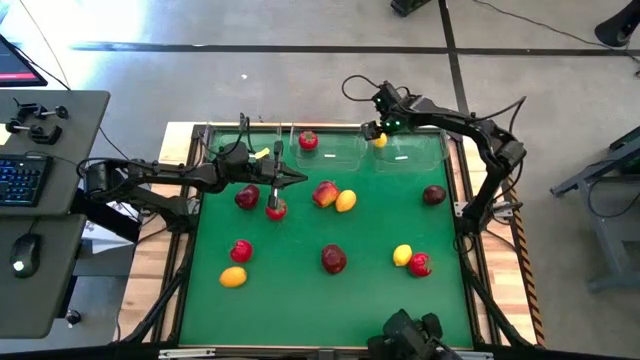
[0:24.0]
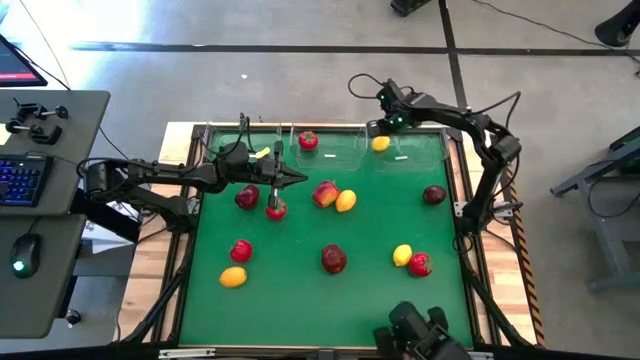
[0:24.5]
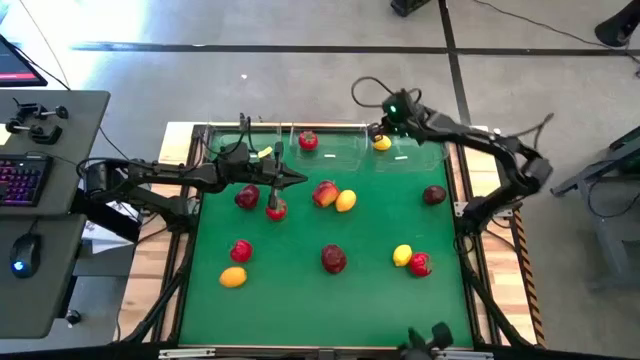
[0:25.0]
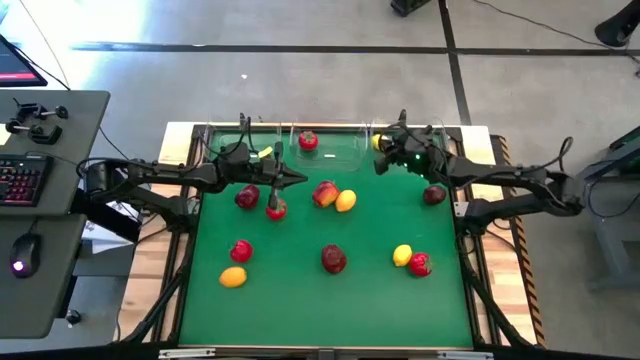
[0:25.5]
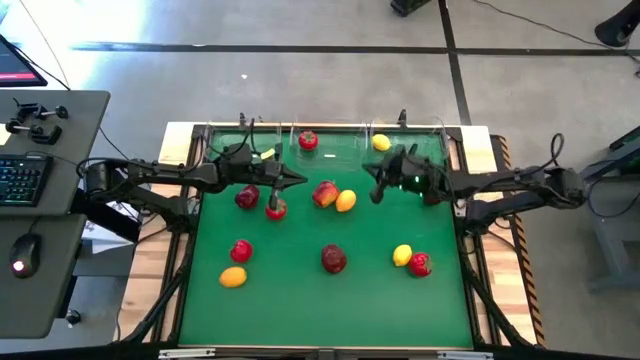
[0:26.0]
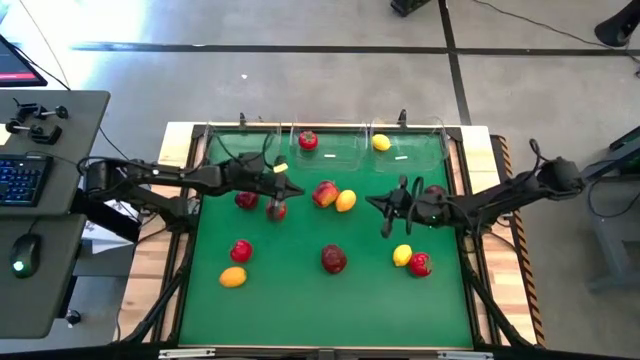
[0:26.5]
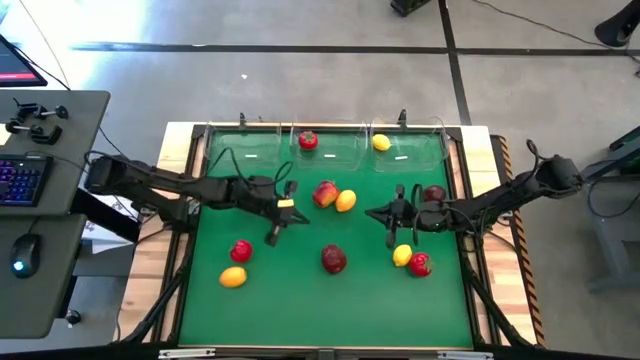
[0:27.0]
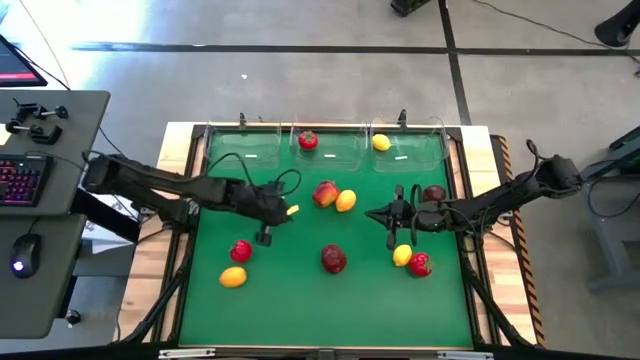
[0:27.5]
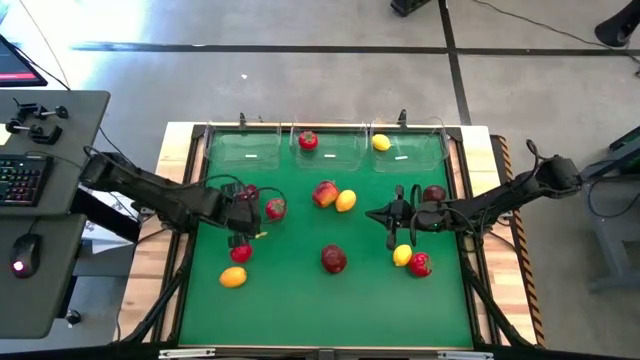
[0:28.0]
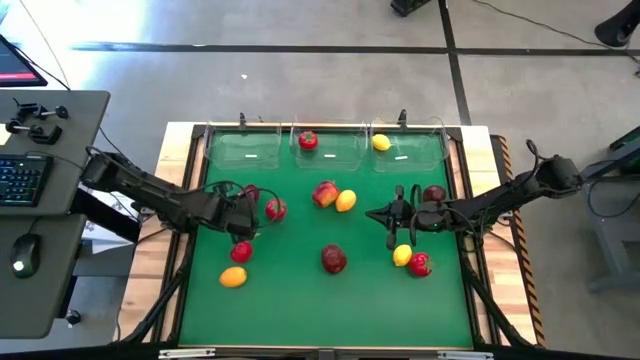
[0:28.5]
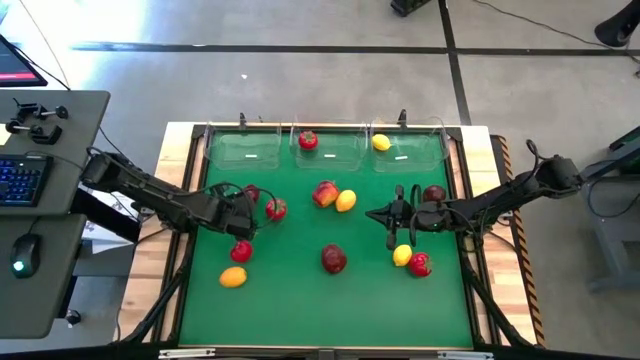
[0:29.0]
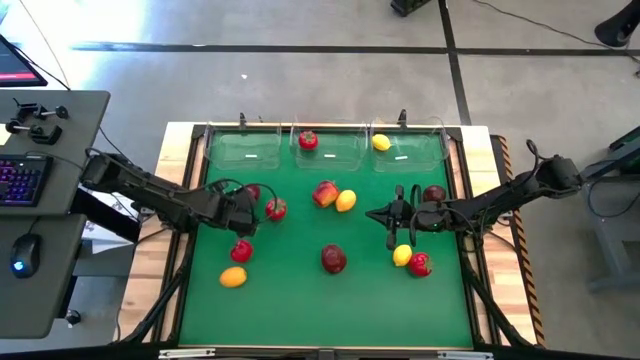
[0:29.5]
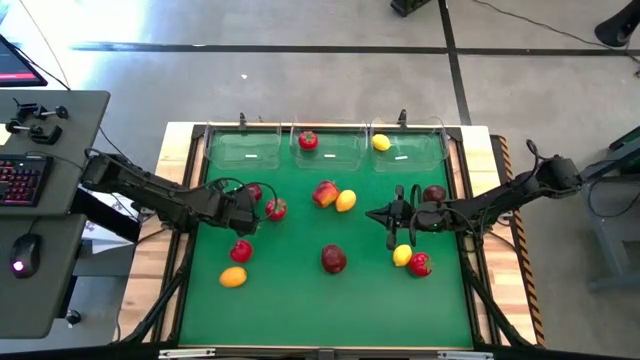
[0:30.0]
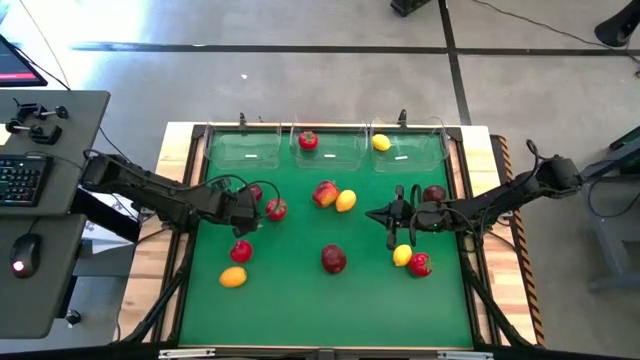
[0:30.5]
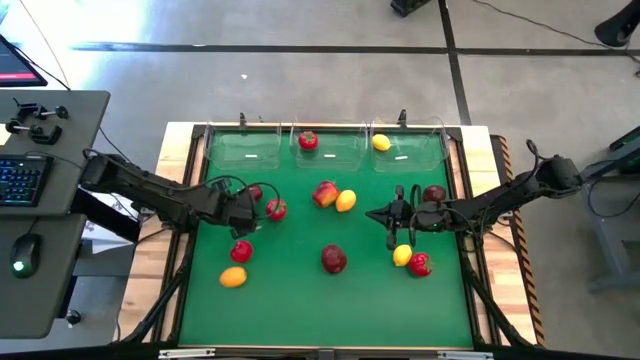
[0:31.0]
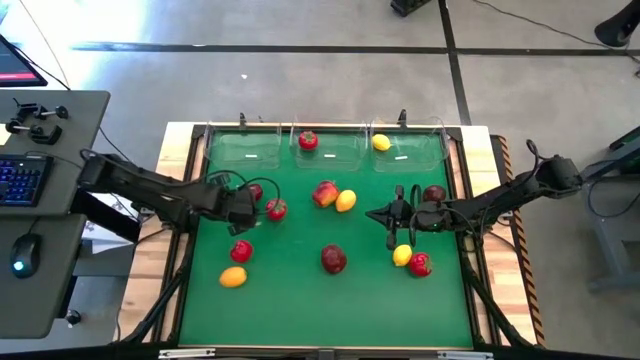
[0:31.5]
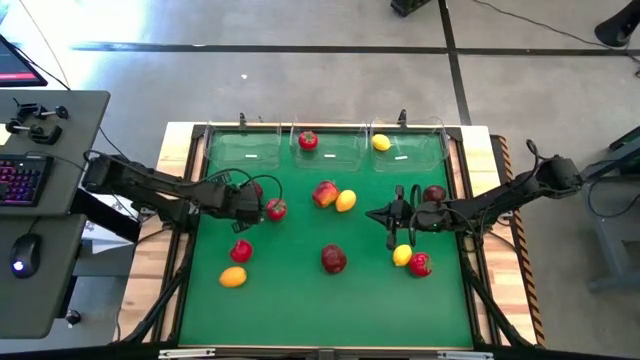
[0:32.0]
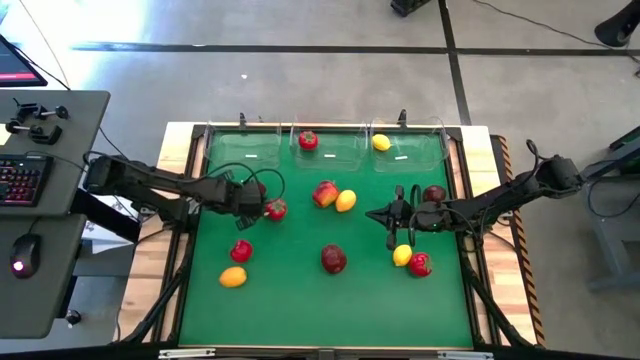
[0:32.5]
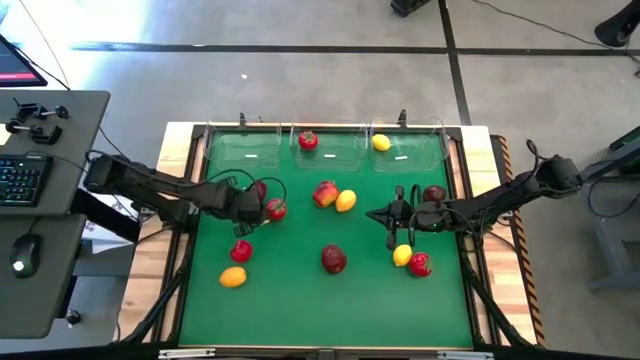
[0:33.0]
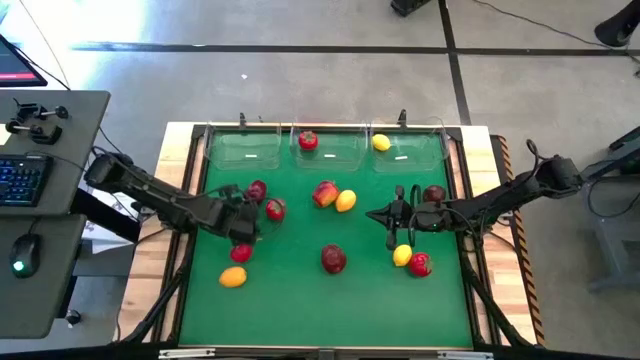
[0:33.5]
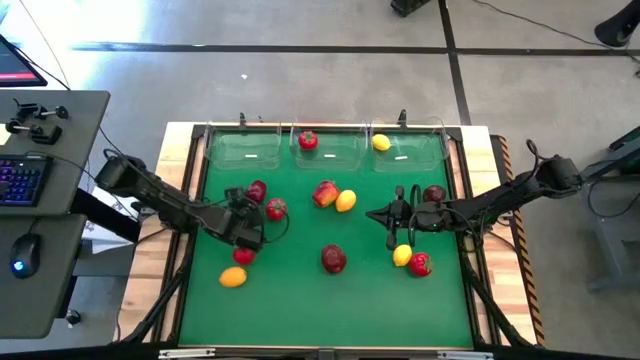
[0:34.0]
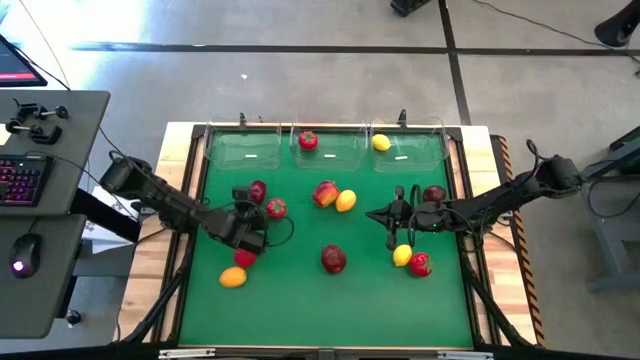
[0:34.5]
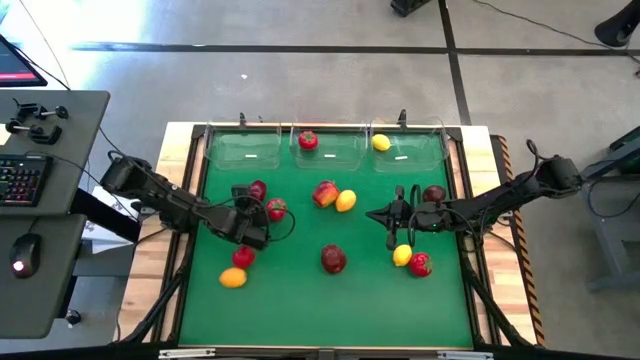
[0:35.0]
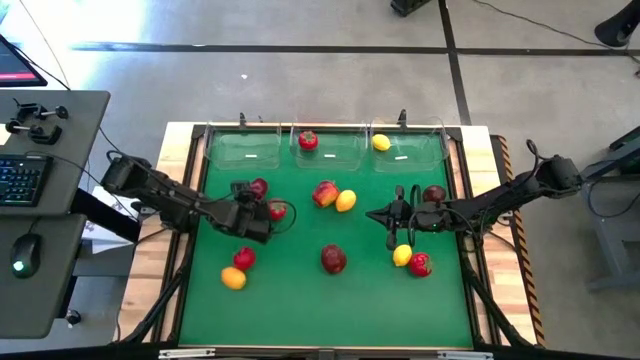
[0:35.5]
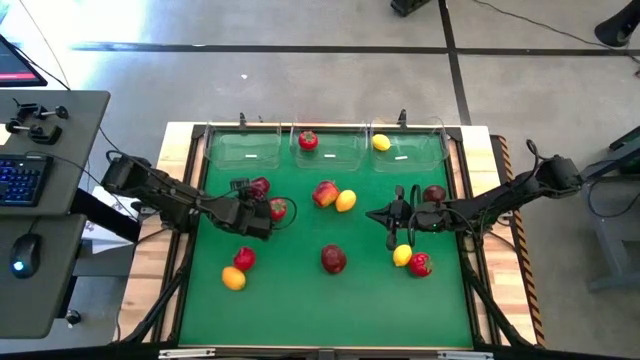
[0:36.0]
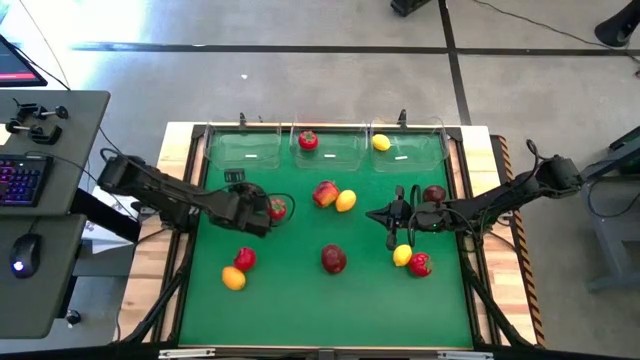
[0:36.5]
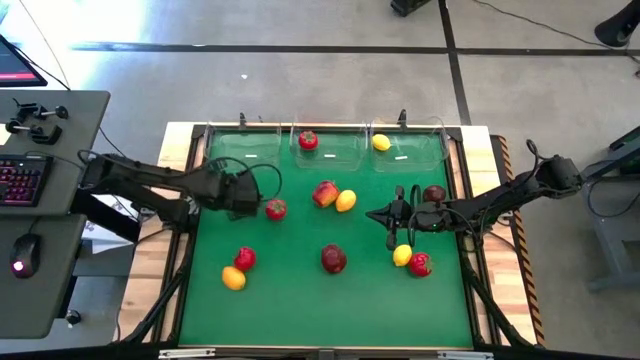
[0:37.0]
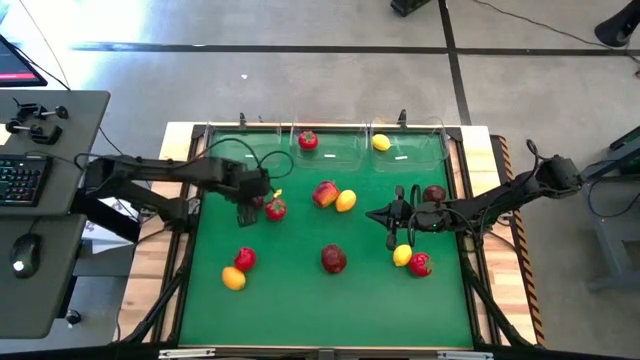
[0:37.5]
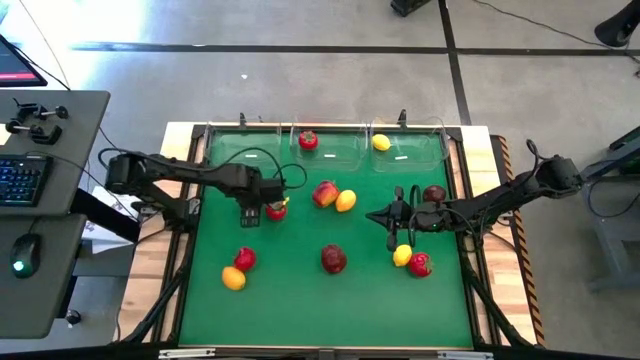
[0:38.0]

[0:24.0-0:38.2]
Task: Sort produce into baskets
Put the top left apple into the left transparent bin

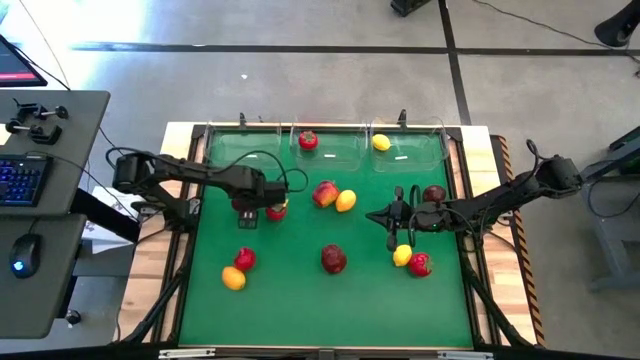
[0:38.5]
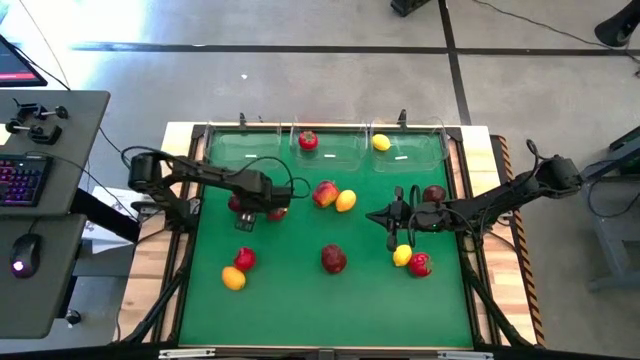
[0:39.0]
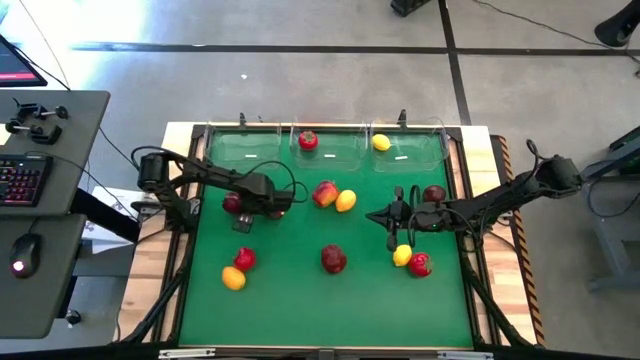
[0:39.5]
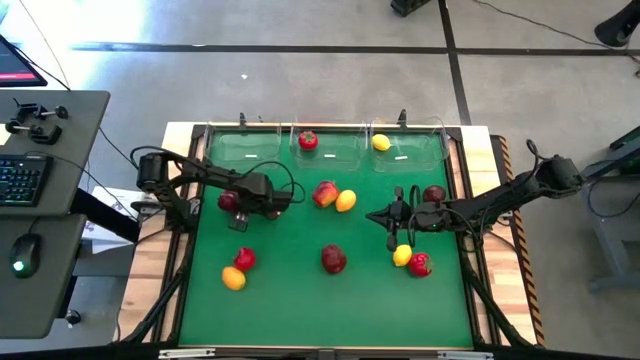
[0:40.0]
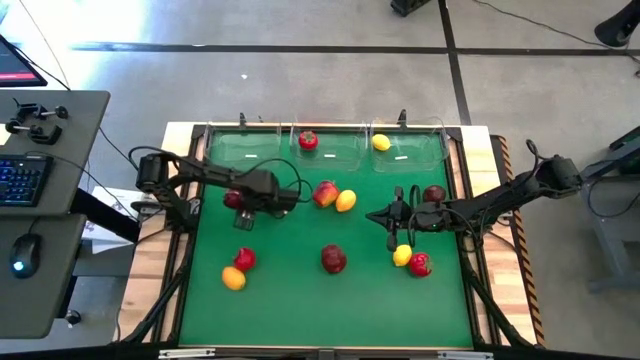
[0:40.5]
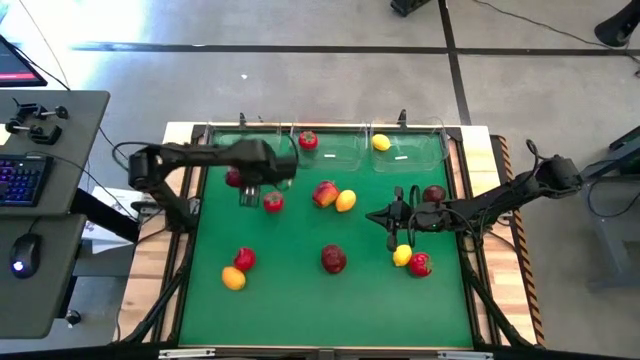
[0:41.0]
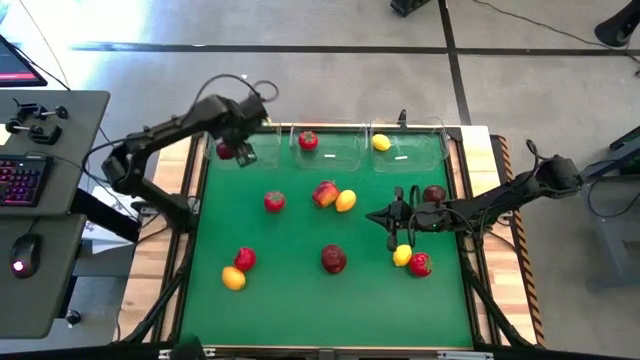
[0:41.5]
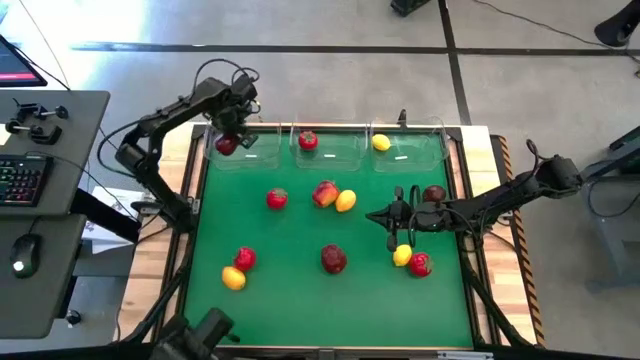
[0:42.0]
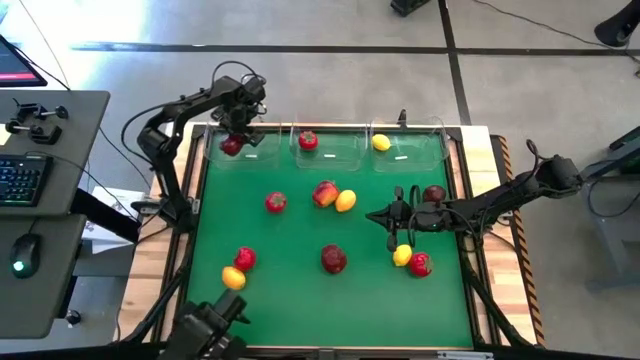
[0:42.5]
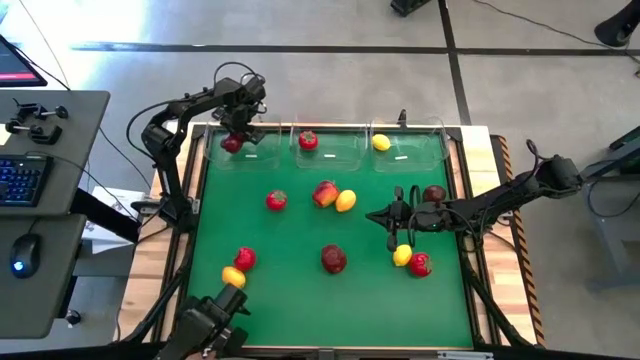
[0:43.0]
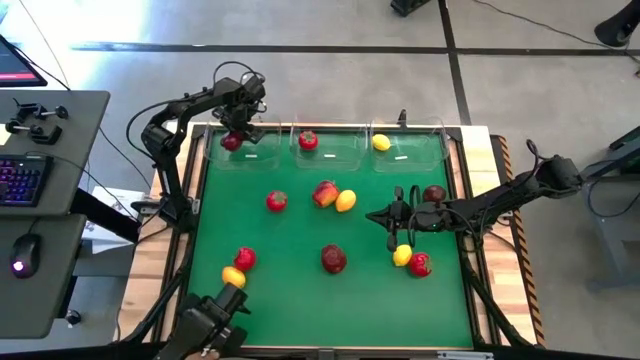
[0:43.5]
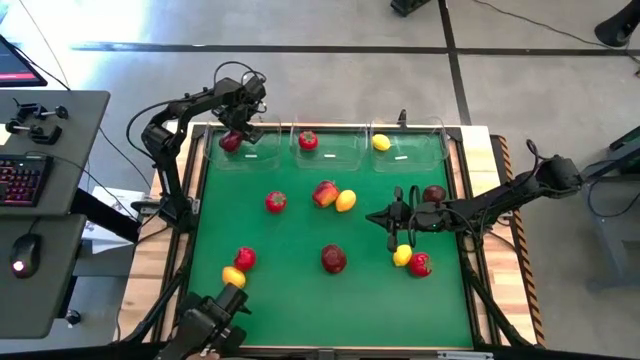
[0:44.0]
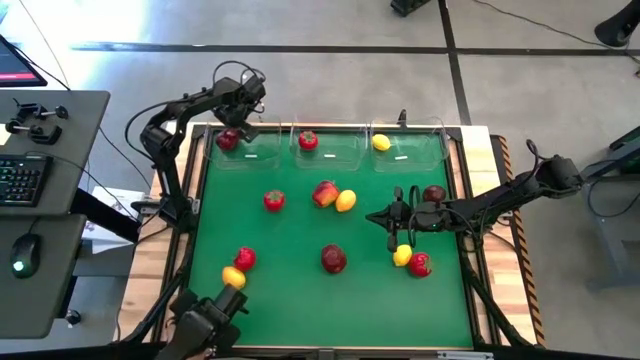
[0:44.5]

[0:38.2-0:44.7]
Put the top left apple into the left transparent bin
